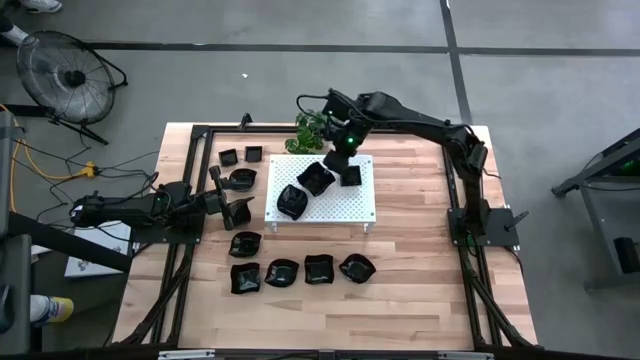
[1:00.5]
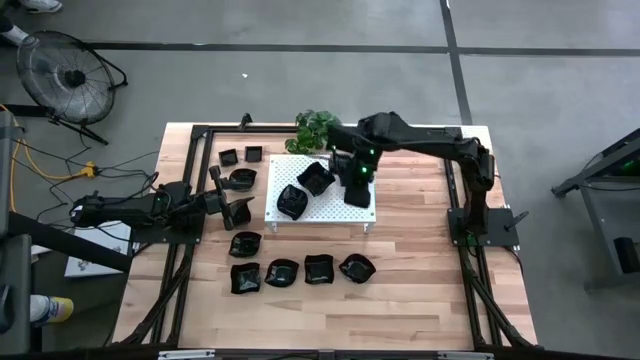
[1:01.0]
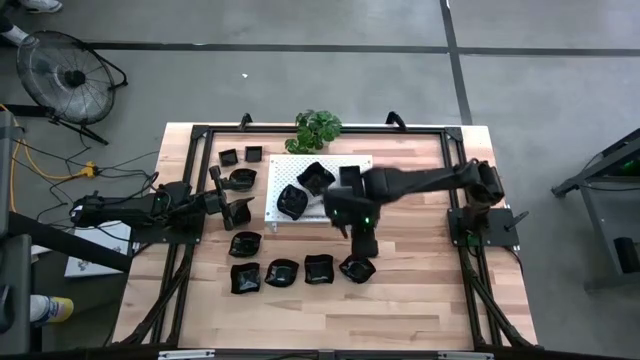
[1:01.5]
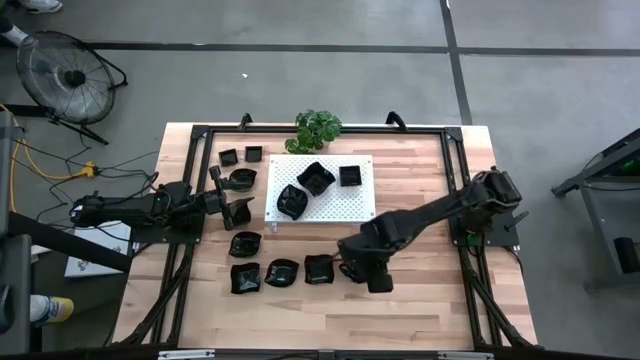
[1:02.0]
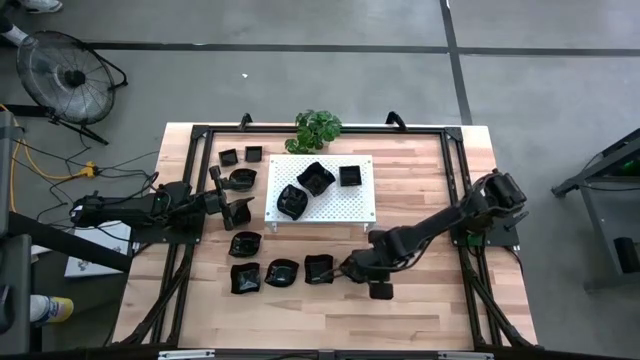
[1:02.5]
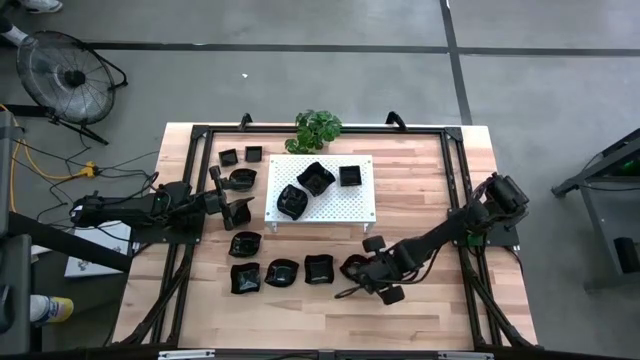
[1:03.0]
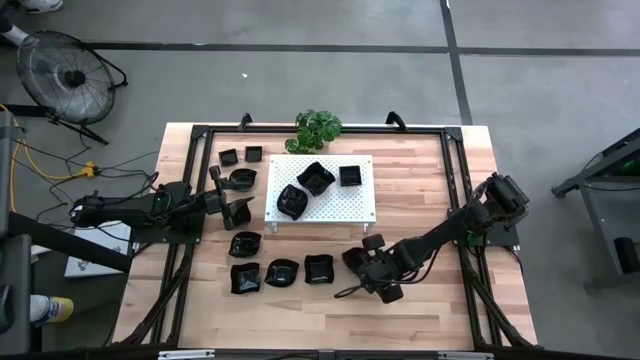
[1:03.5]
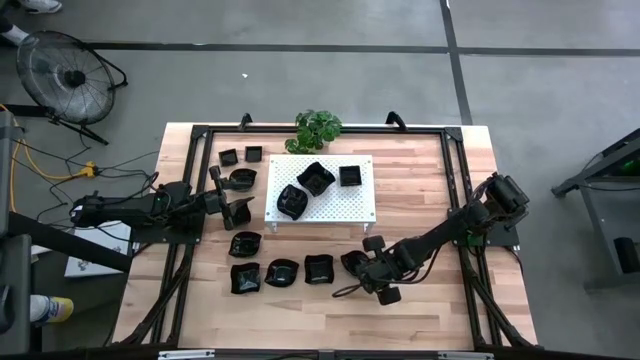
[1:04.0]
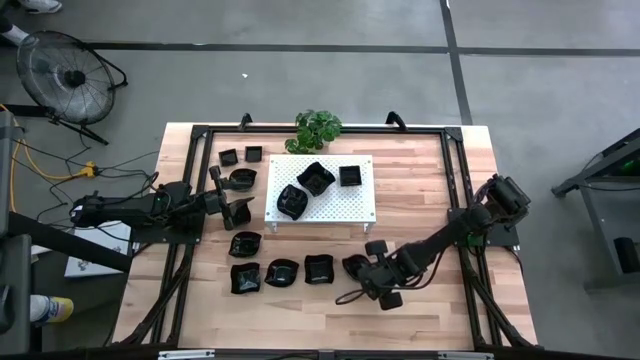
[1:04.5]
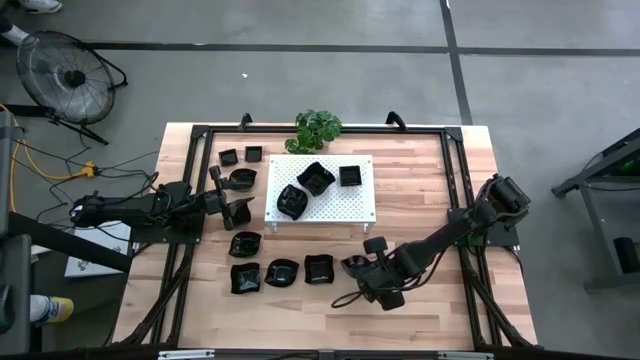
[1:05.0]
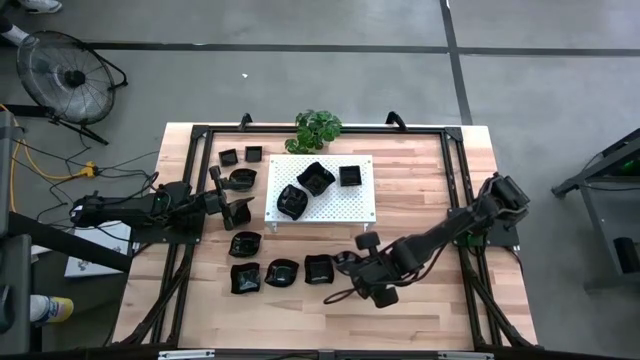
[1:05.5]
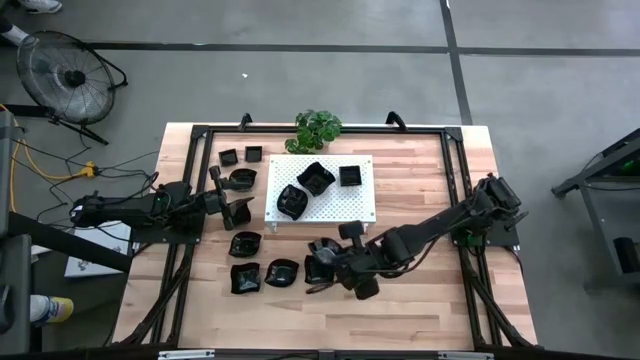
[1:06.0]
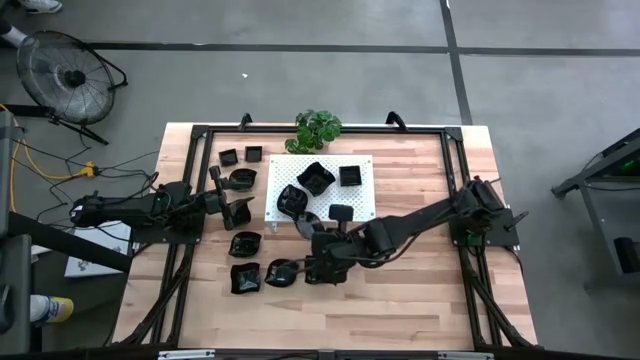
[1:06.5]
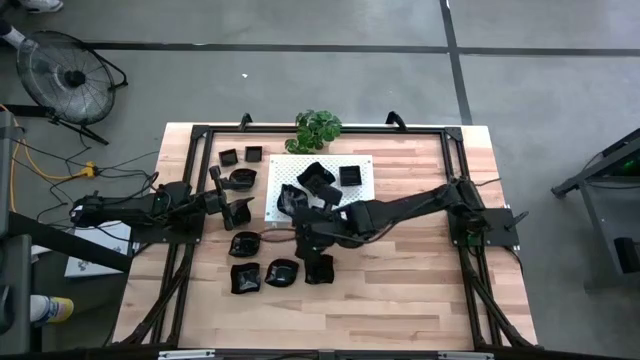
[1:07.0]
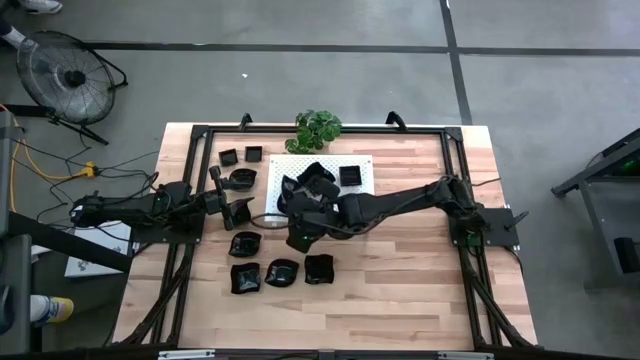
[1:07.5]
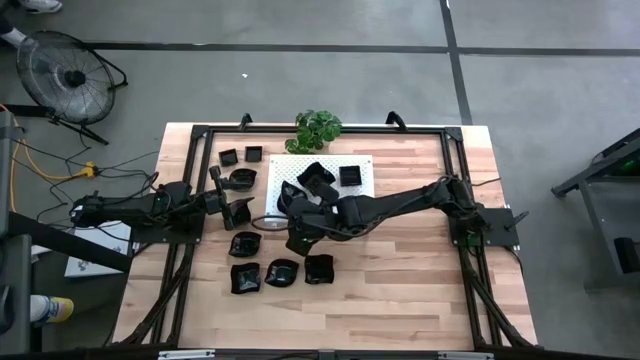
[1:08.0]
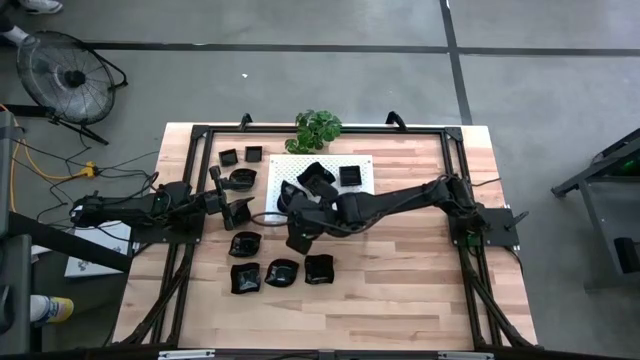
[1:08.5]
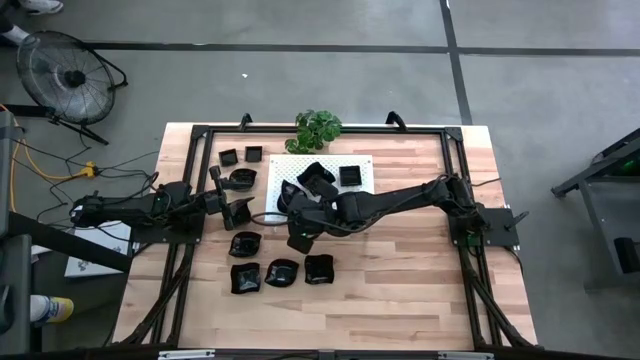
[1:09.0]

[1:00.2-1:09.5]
Task: Pick & Place Mini shaped plates
Stack the leaf shaped plate on top of the leaf shaped plate on the shelf

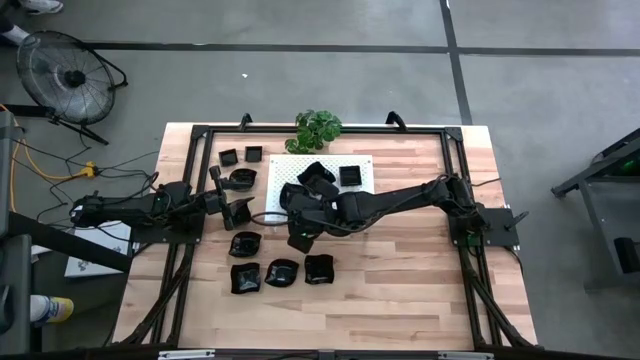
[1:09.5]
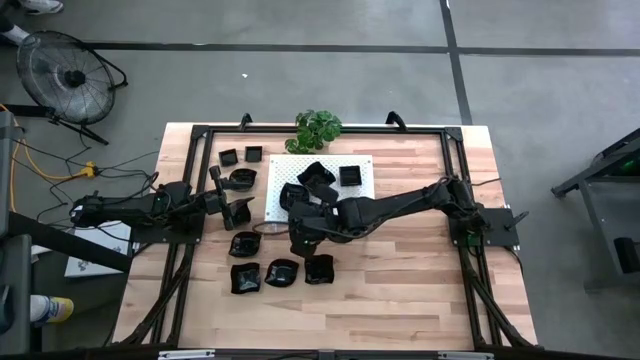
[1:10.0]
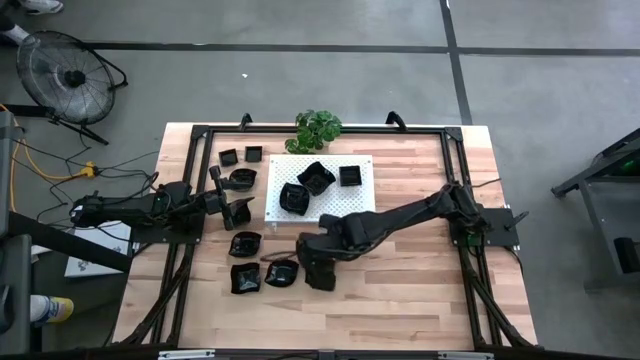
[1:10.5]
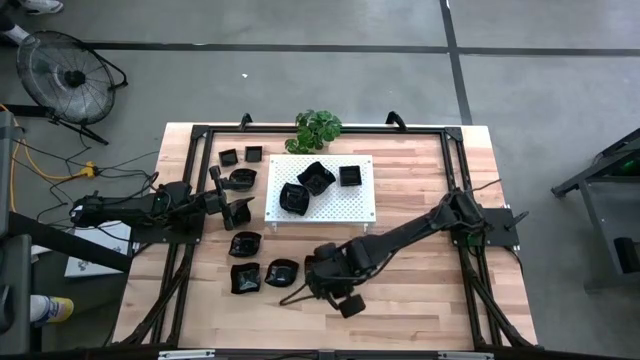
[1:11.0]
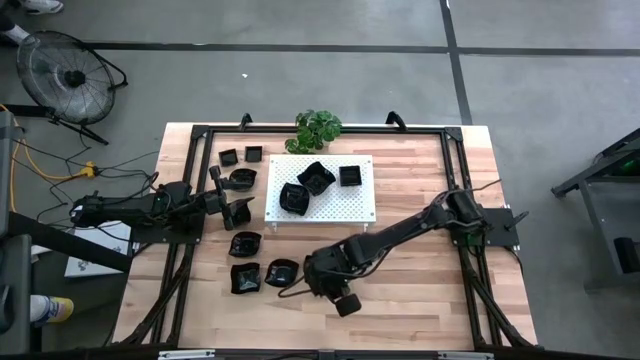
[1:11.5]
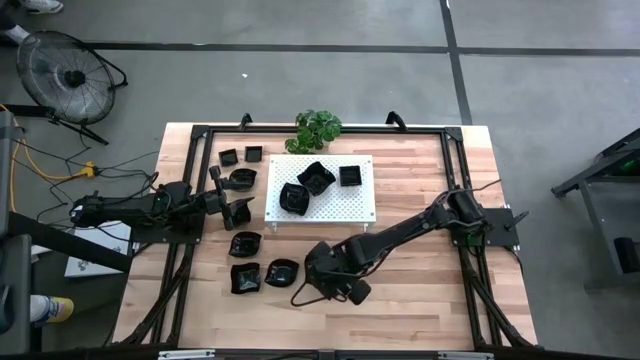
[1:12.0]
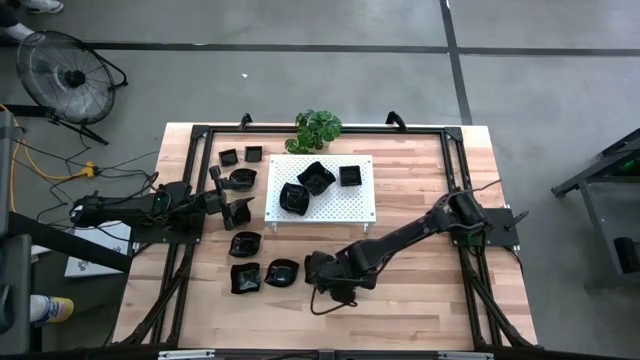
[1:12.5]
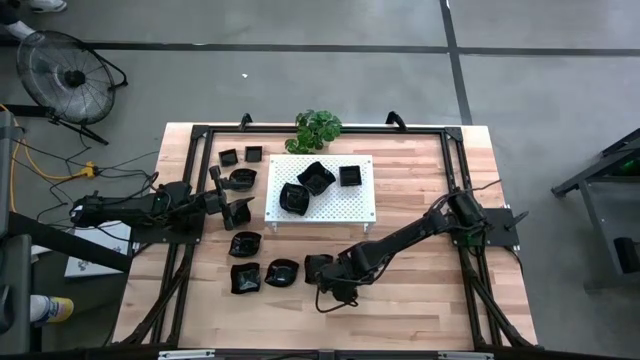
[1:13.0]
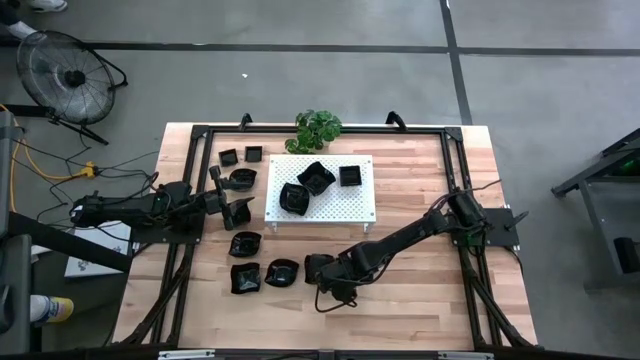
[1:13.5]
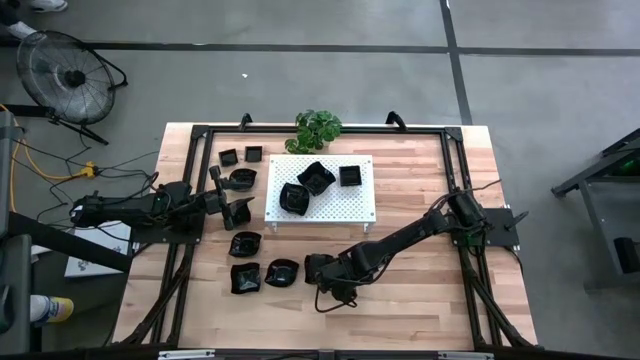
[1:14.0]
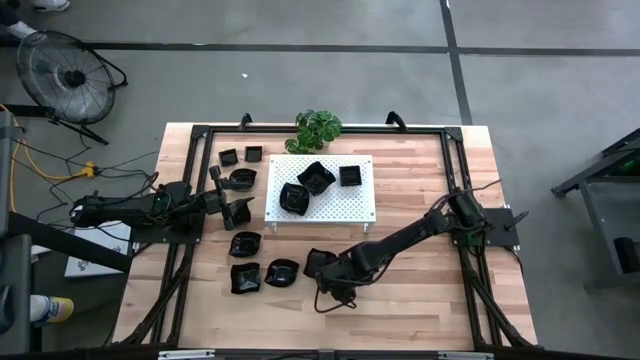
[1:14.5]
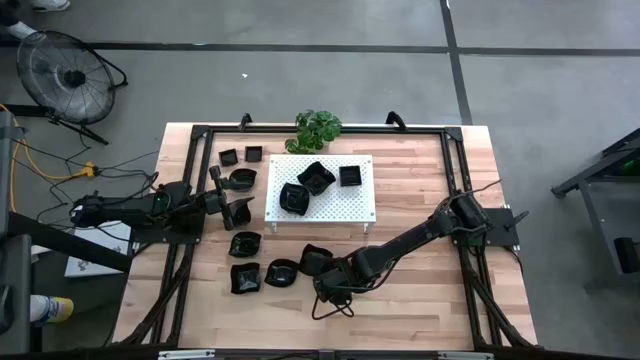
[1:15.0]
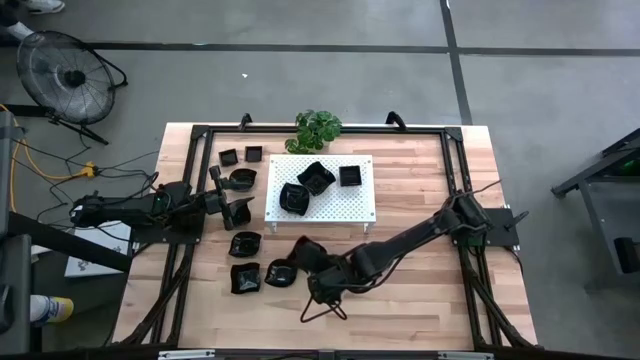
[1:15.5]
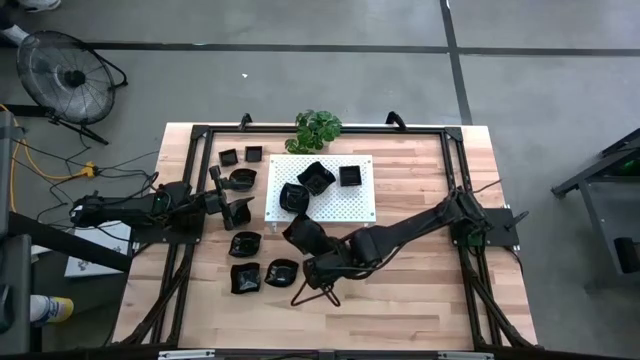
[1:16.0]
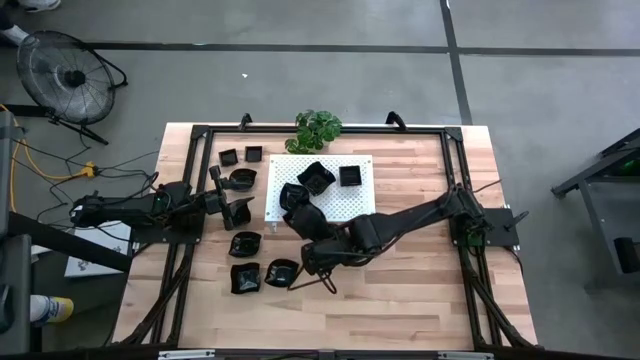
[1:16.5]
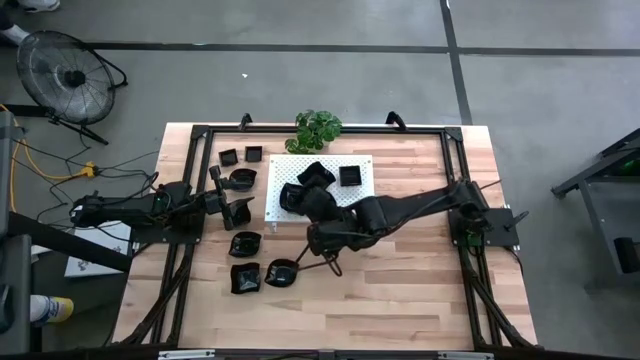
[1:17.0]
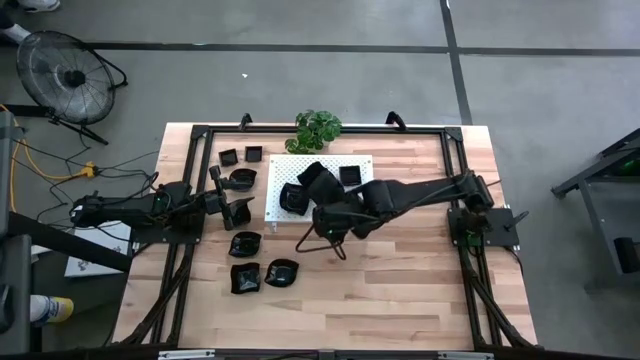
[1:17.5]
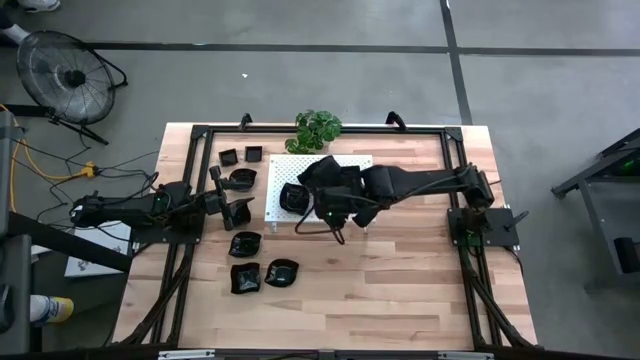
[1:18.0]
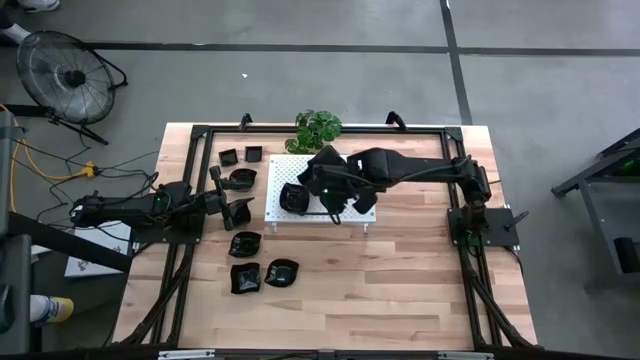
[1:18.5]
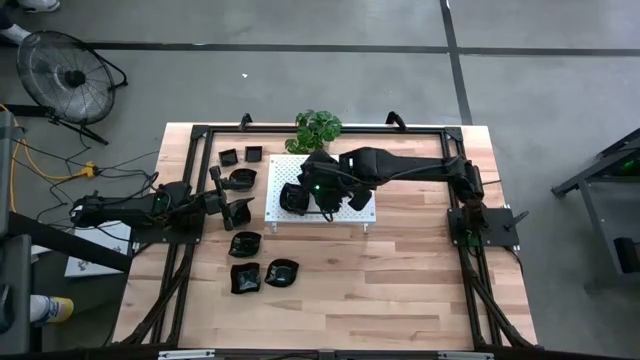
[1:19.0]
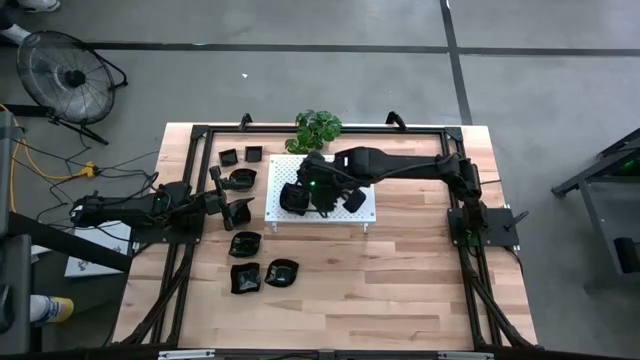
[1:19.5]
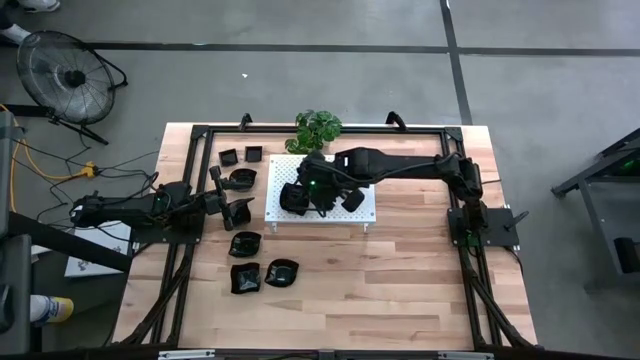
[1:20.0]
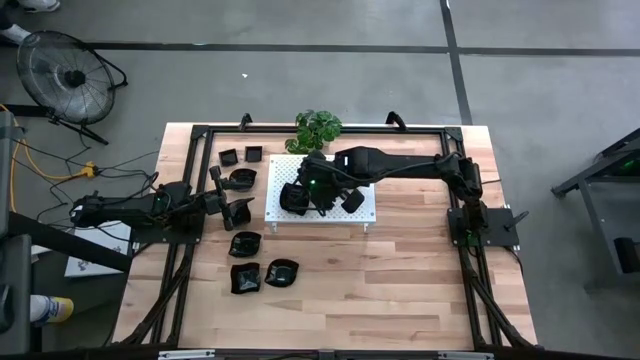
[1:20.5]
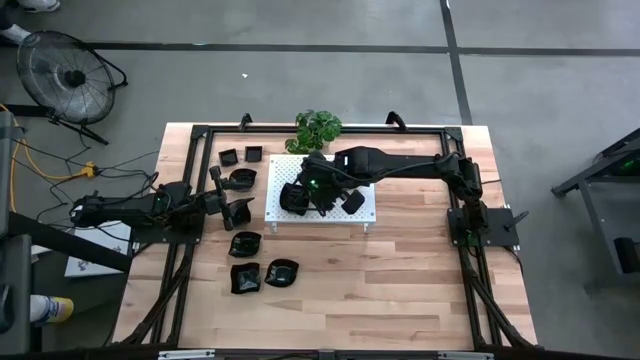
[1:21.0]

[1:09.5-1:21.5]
Stack the distorted square plate on top of the distorted square plates on the shelf

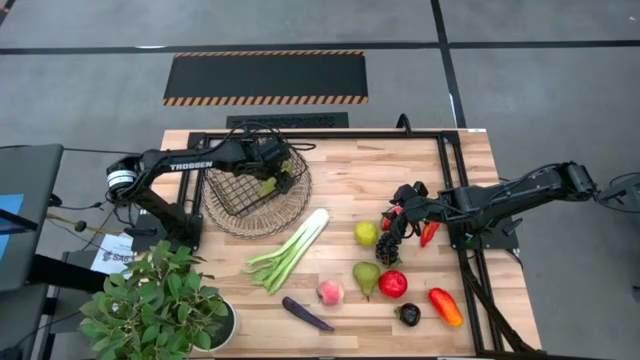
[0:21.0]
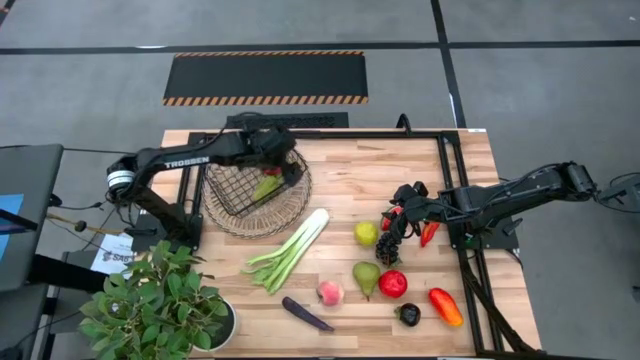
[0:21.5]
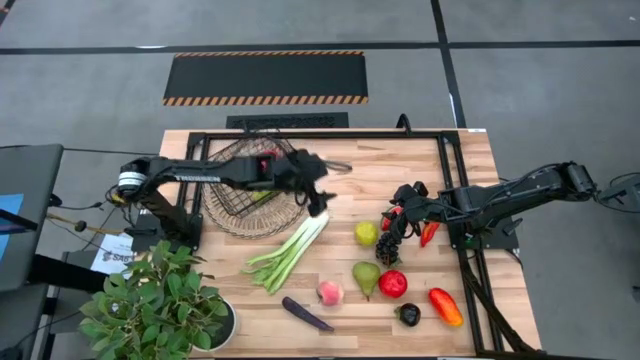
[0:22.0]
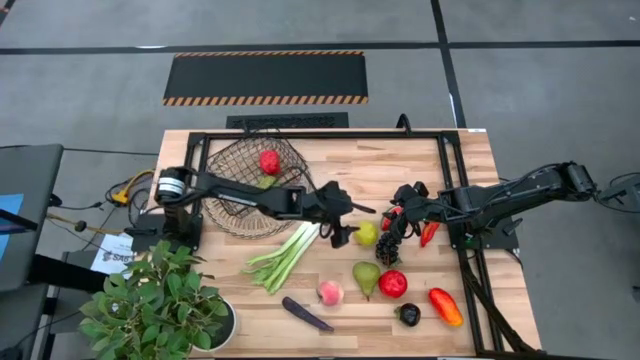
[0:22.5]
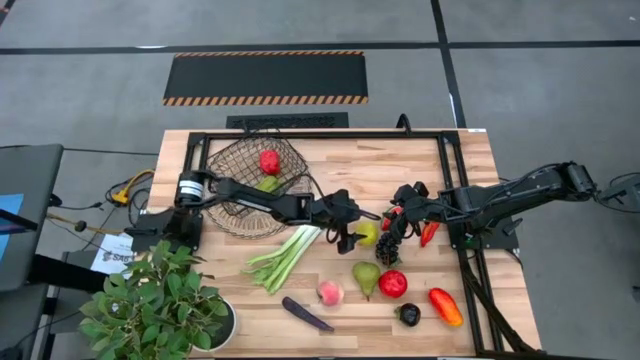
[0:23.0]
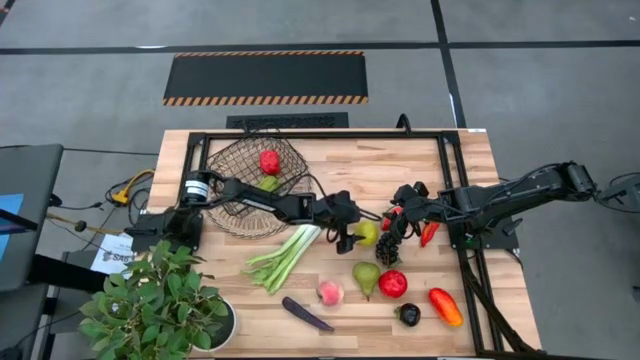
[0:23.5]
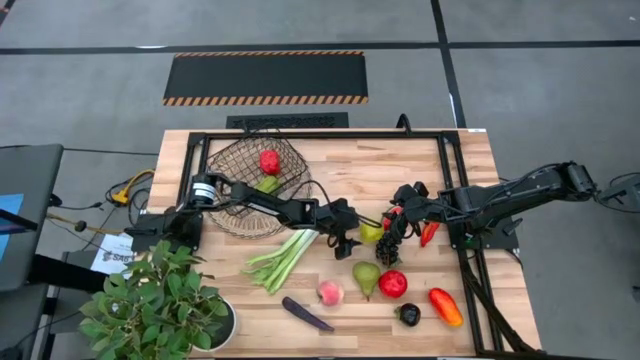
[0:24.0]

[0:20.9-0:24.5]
Task: Build produce basket
Put the green apple into the wire basket
